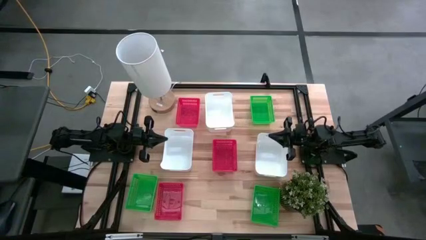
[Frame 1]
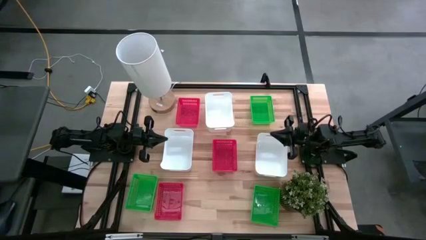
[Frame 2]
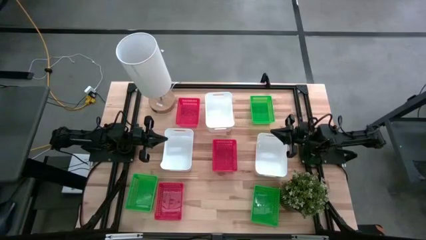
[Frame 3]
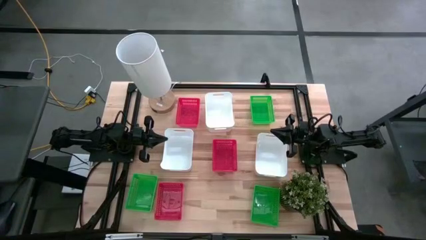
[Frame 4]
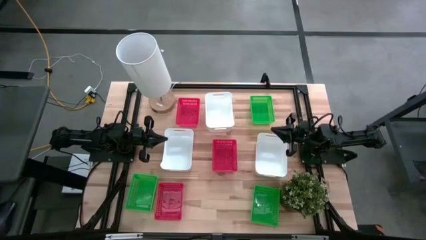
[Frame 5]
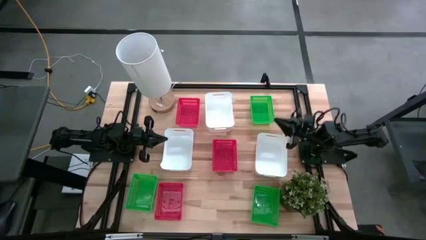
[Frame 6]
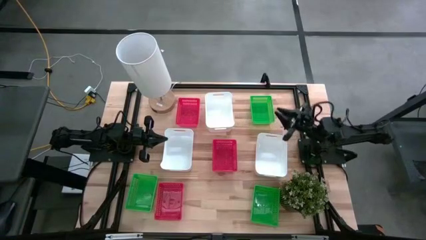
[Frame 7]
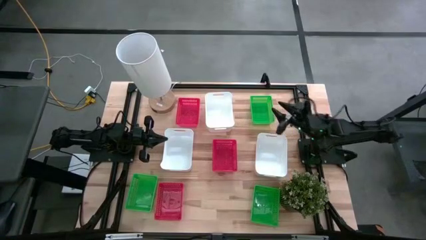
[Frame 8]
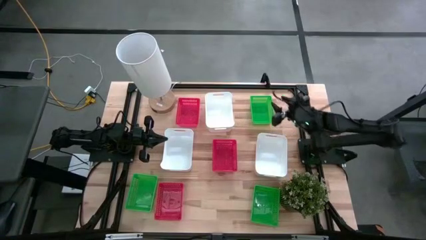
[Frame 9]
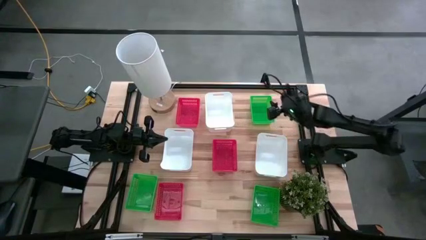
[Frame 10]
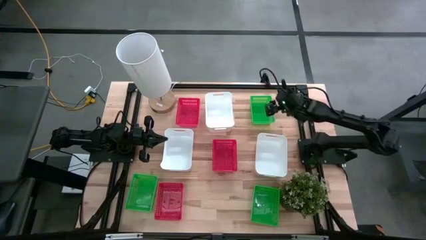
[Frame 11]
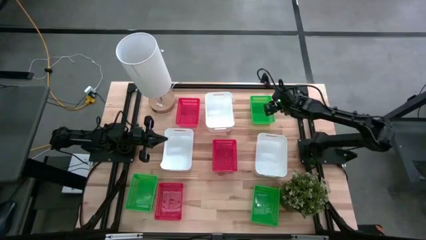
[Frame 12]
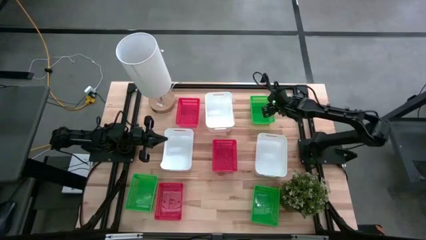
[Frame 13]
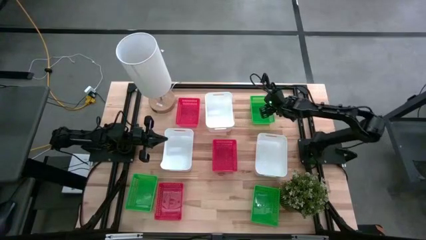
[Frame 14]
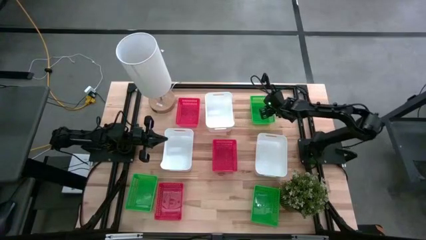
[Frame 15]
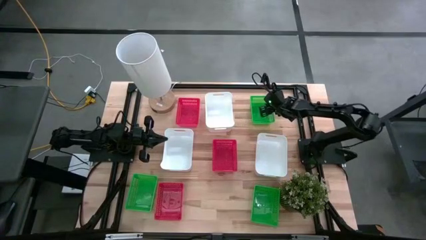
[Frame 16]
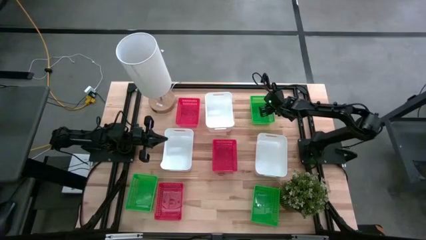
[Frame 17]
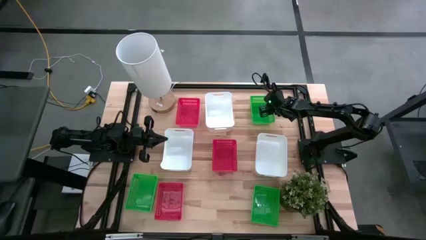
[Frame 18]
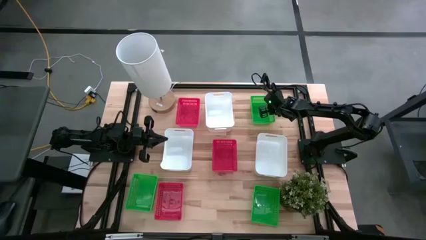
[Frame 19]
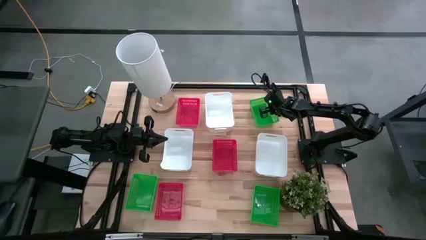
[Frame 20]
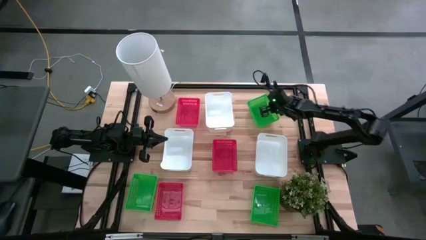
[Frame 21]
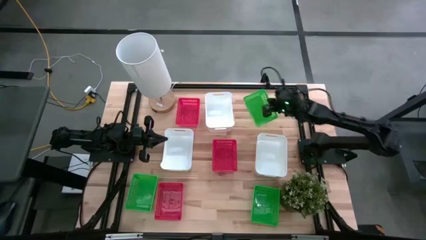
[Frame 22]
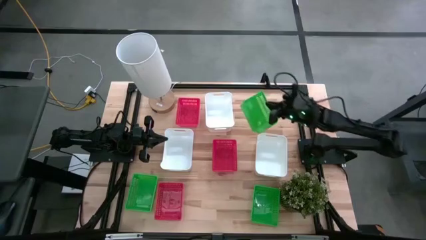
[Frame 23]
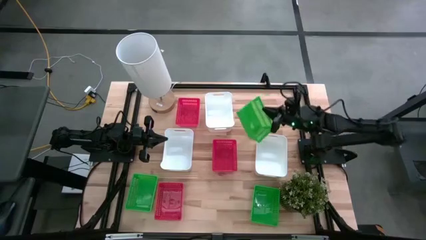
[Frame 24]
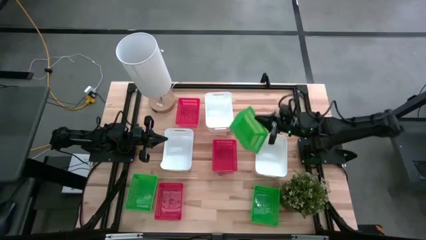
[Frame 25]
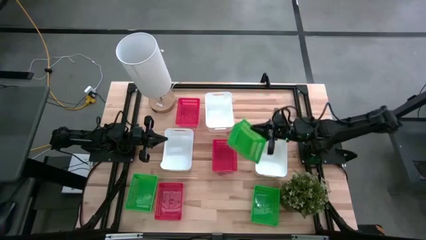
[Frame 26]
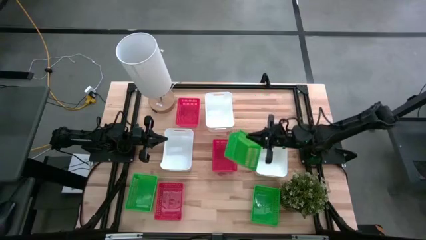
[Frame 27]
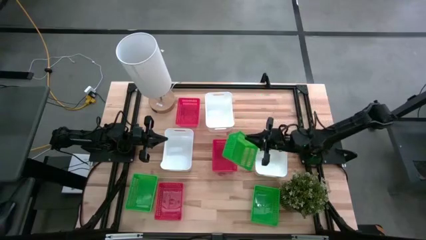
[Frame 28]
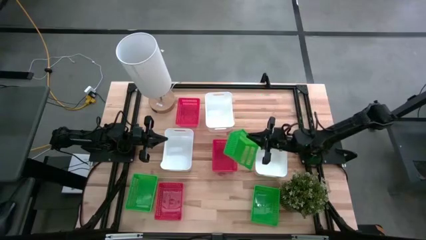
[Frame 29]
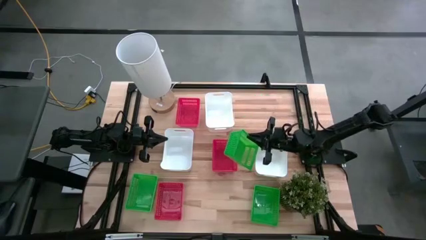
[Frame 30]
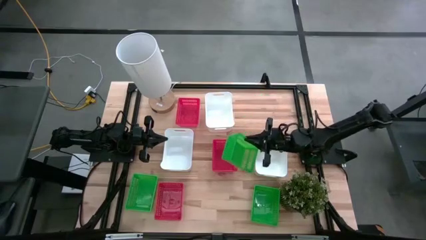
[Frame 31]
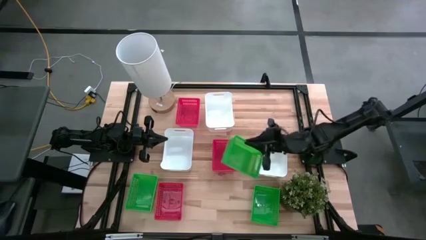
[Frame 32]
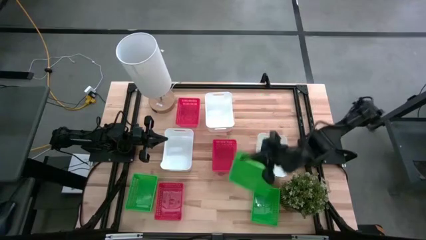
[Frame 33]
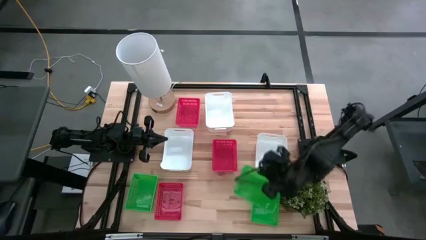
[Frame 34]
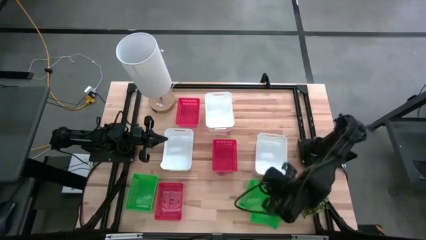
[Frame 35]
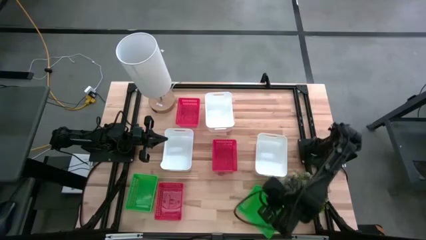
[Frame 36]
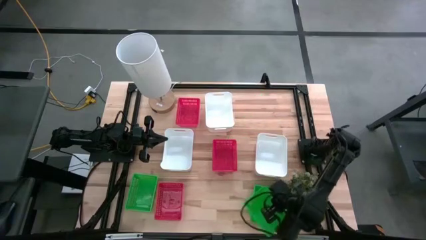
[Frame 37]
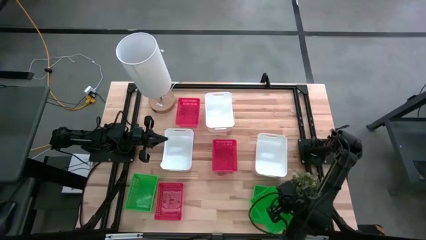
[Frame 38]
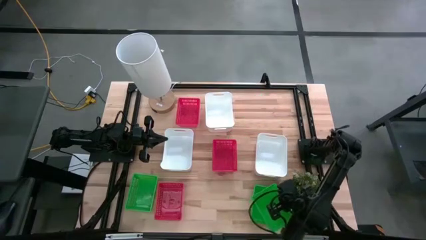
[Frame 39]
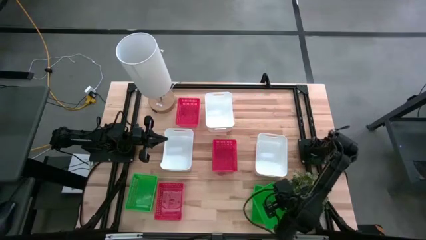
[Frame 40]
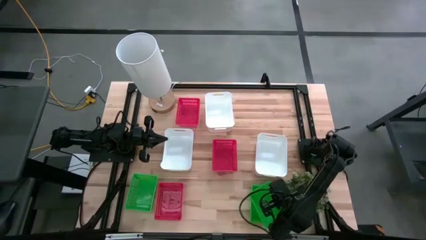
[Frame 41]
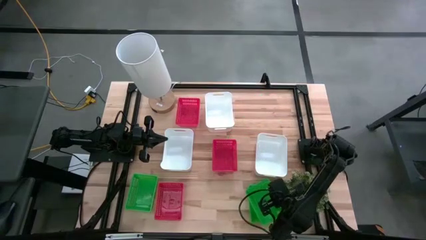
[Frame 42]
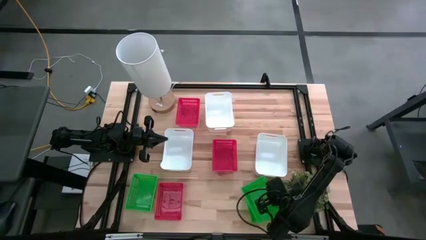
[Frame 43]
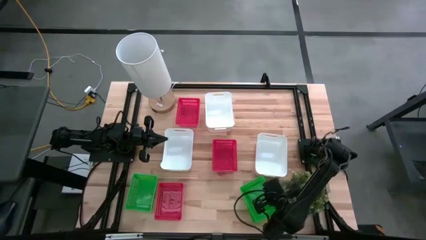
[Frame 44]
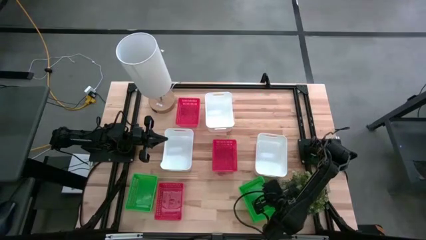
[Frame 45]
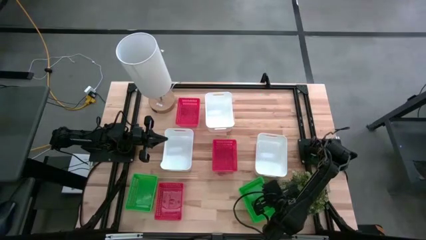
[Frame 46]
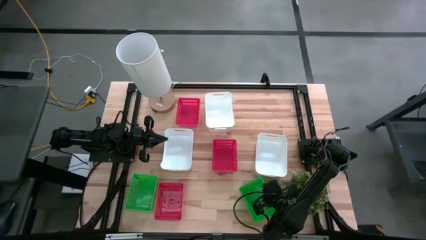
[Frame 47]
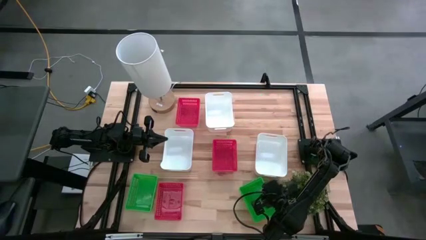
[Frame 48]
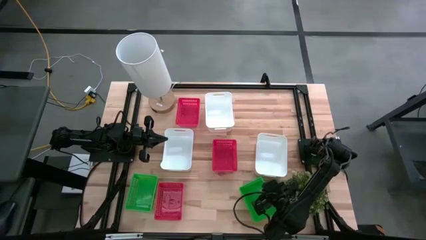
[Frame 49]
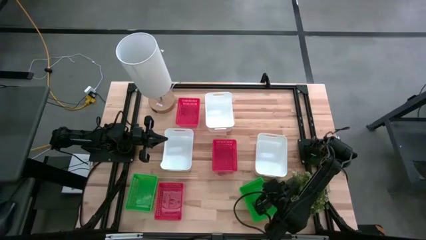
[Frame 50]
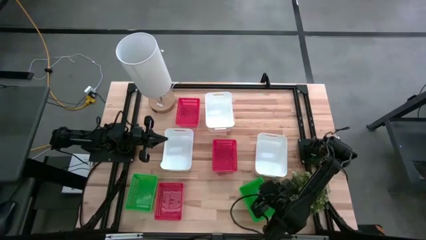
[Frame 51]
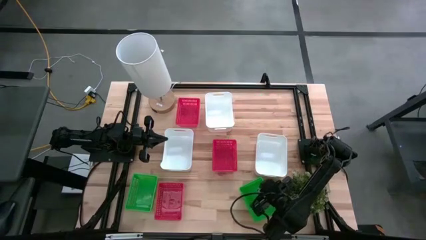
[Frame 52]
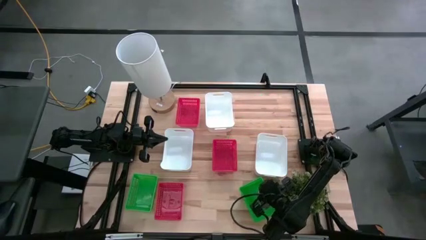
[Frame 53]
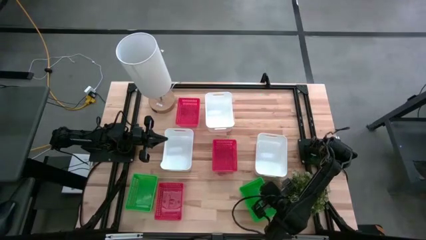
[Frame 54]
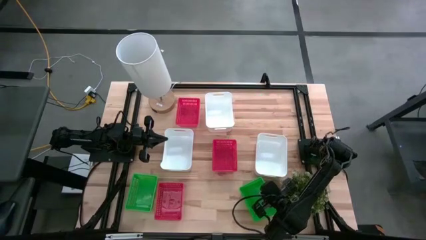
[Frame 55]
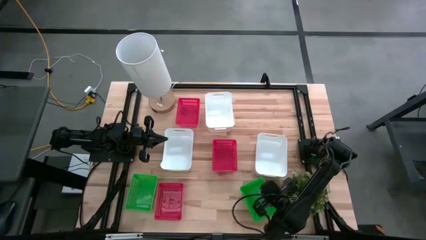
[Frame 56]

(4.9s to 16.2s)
Stack the top green bin on top of the bottom right green bin

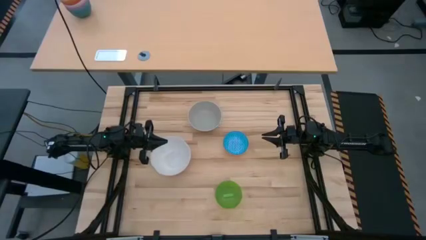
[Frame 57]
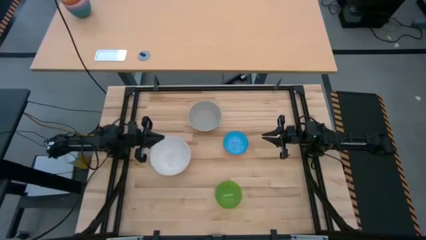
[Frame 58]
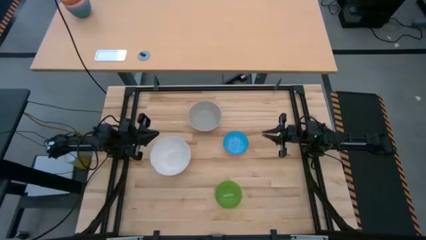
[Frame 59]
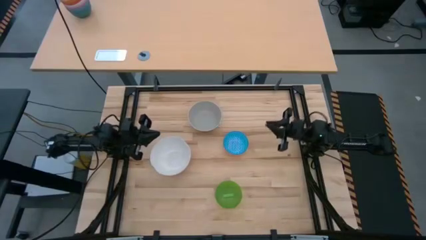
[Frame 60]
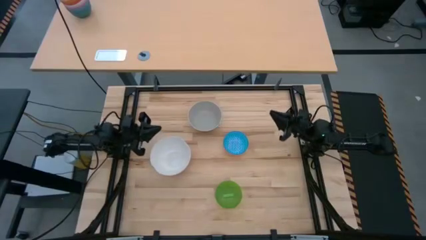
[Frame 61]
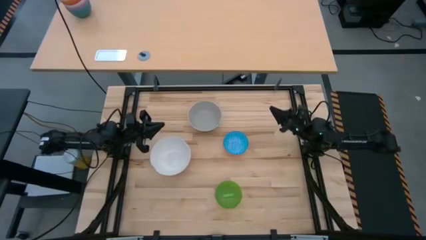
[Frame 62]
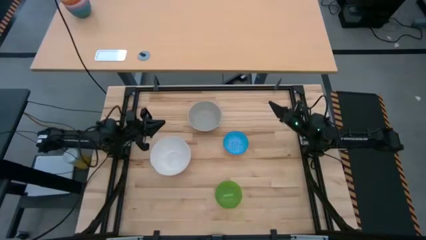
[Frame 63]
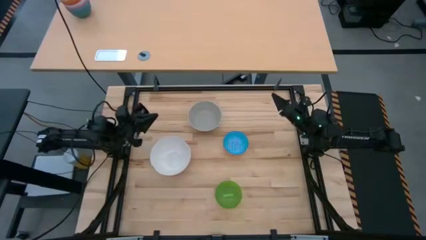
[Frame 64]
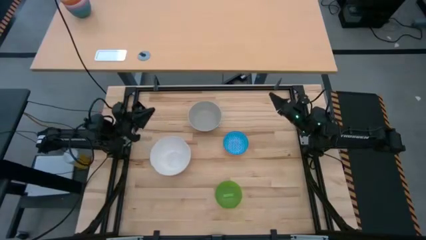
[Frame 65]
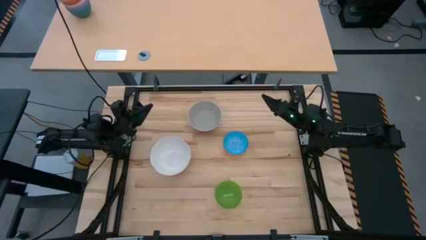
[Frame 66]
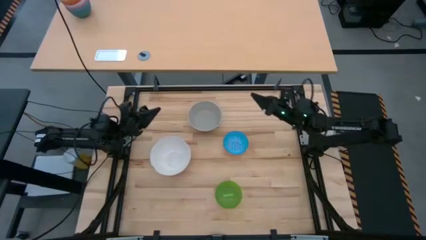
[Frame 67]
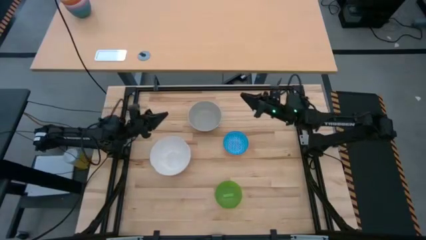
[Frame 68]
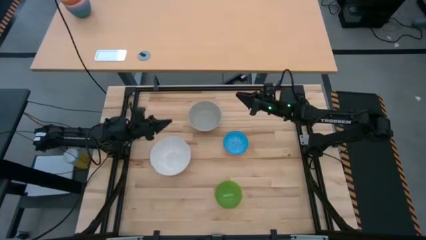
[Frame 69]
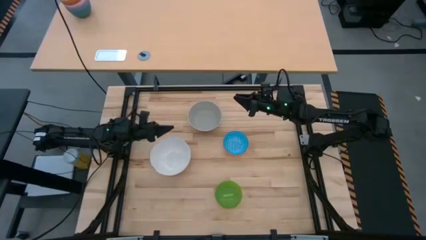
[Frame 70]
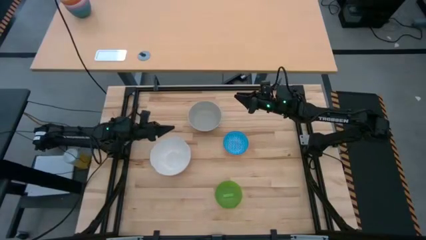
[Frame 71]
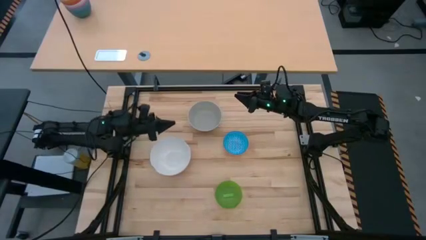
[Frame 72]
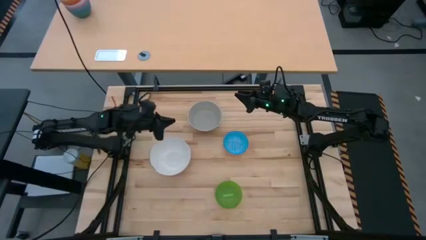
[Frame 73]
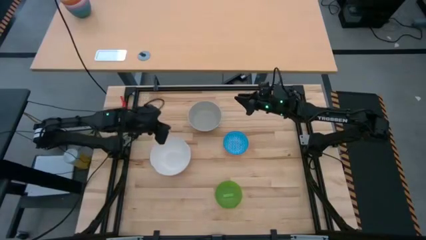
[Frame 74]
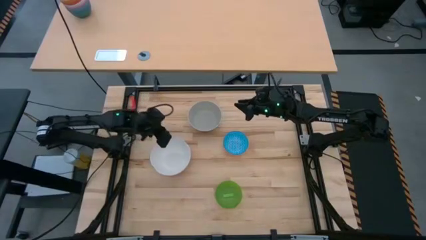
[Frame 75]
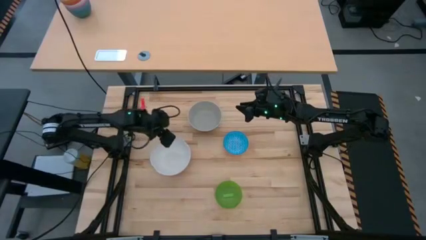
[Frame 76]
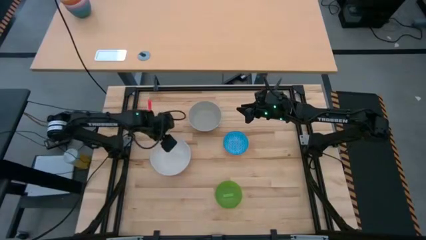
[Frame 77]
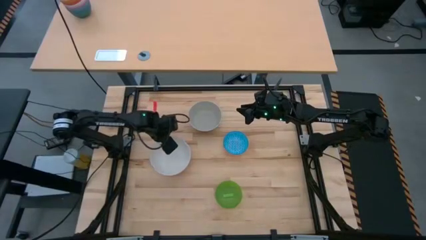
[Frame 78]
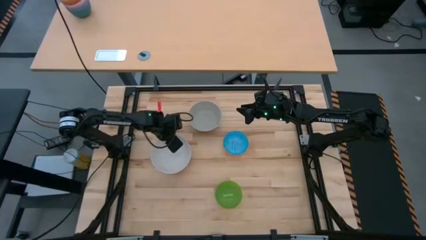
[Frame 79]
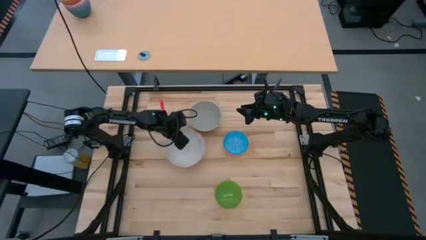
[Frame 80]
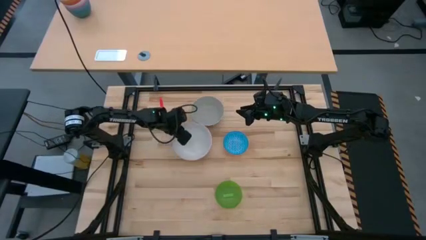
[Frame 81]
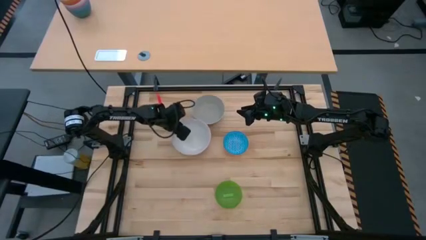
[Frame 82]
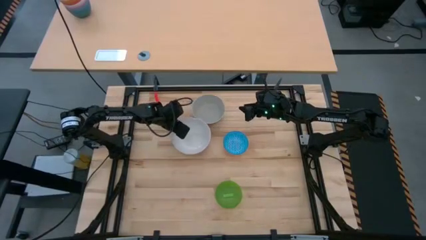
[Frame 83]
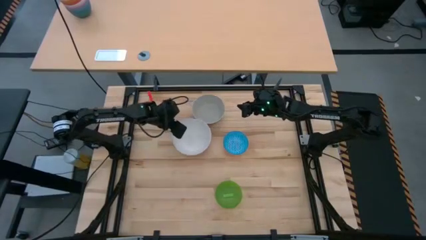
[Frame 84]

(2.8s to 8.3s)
Move the white bowl to the top center of the table
